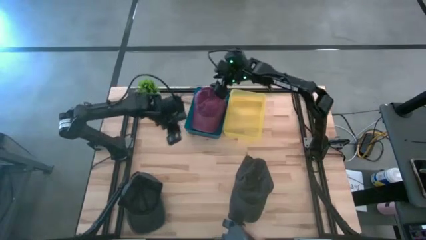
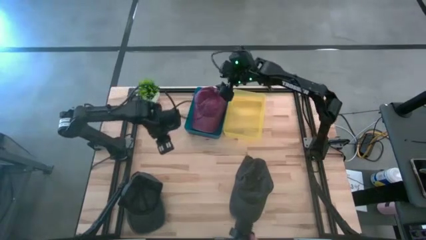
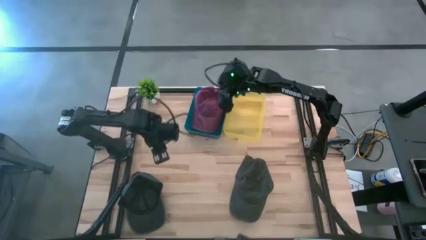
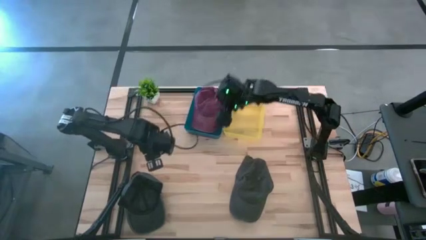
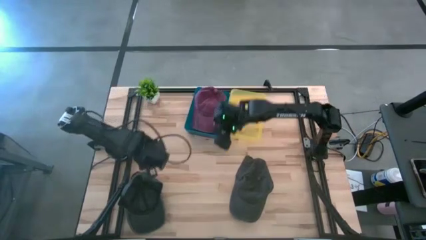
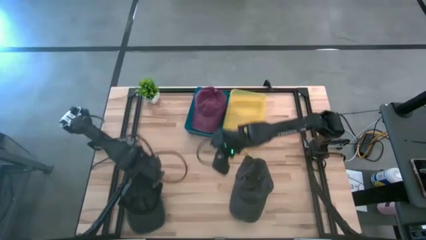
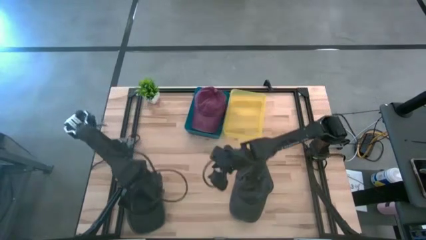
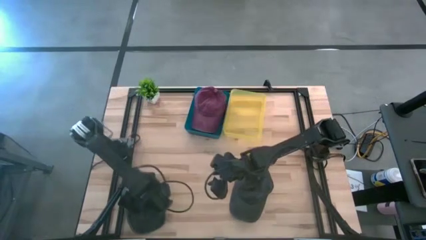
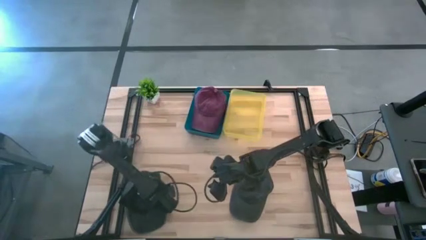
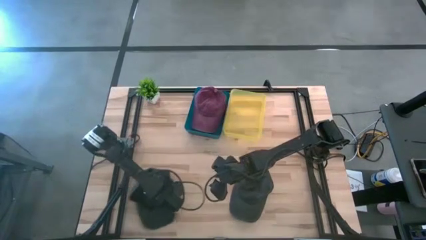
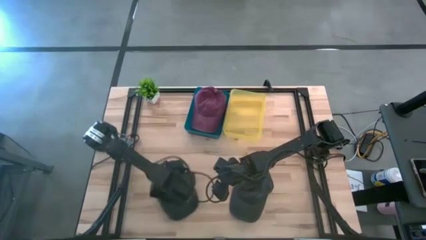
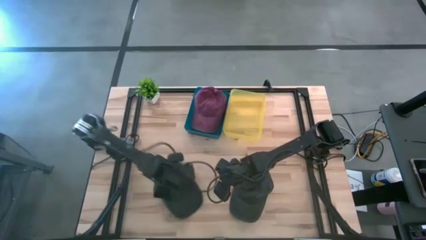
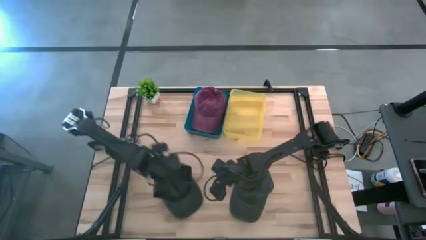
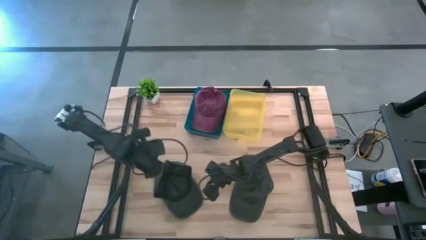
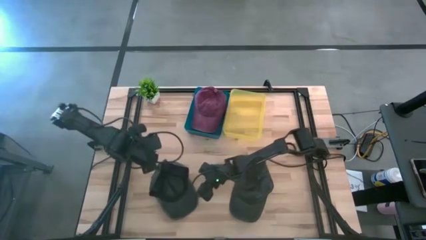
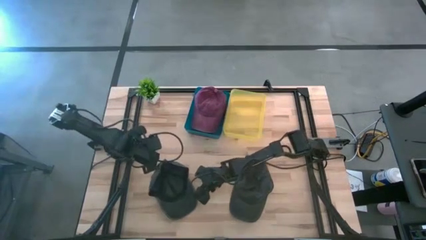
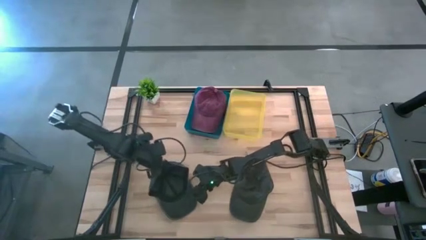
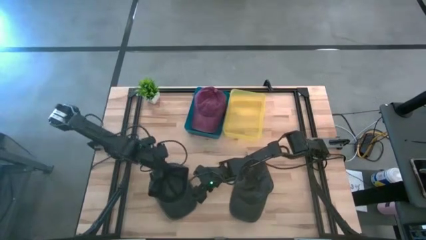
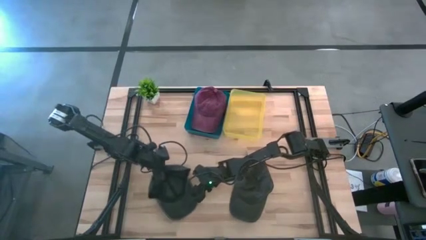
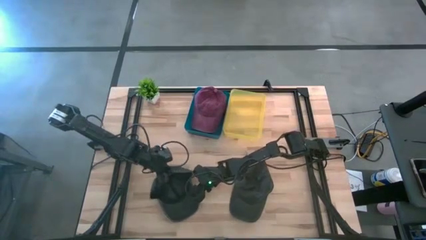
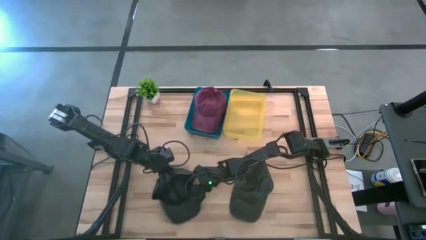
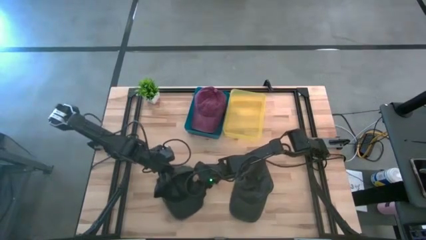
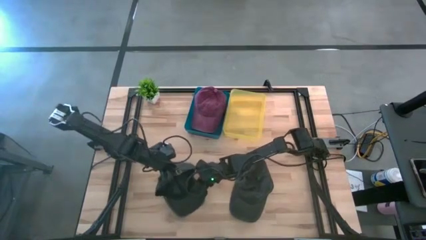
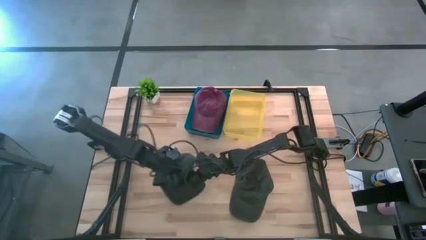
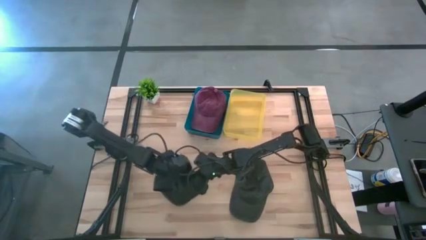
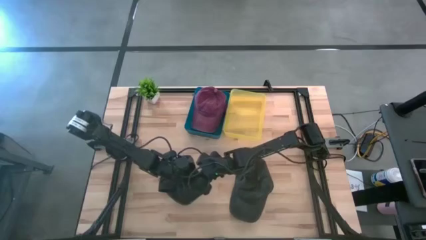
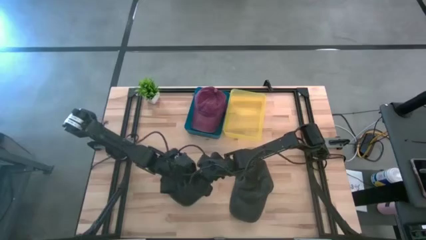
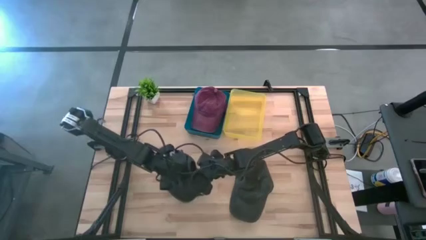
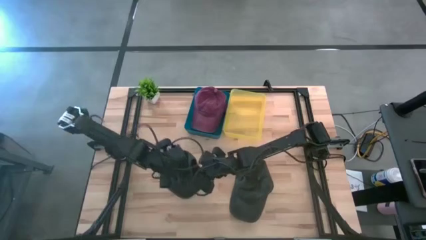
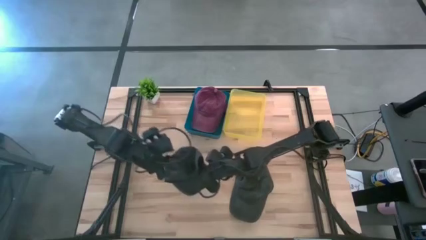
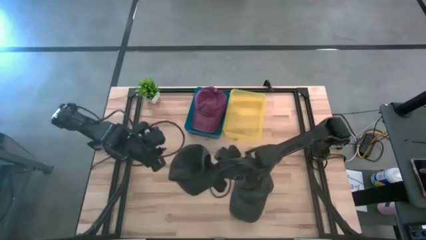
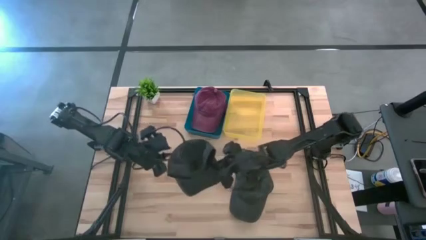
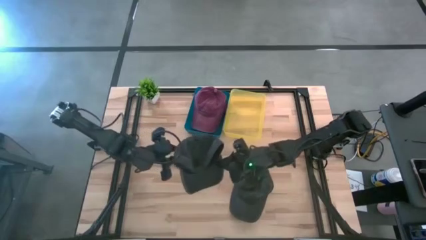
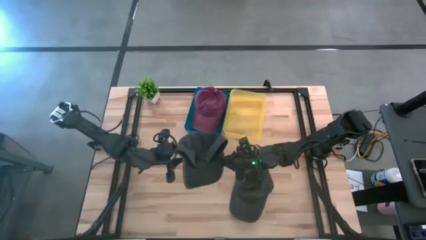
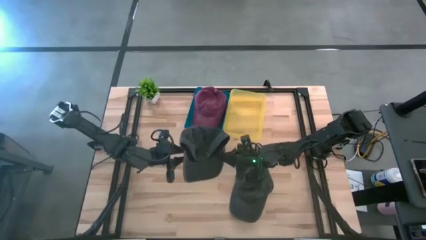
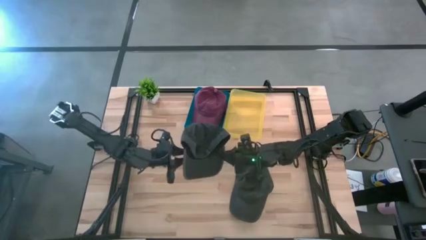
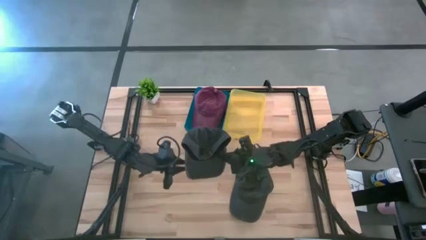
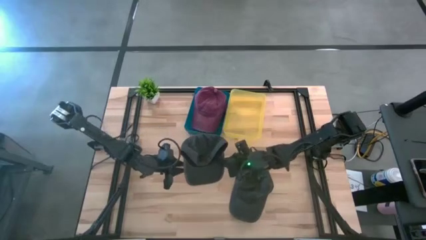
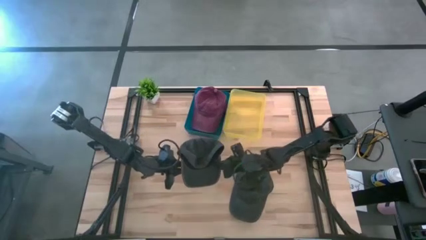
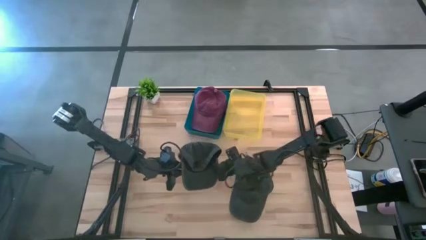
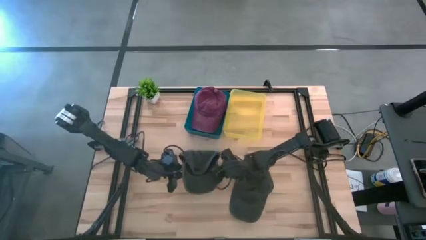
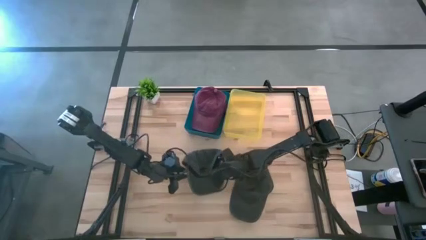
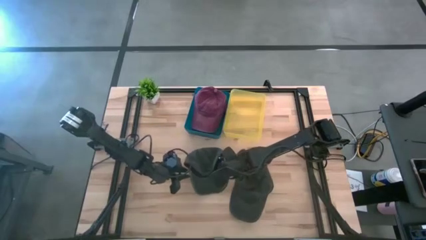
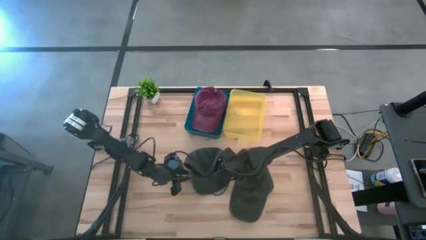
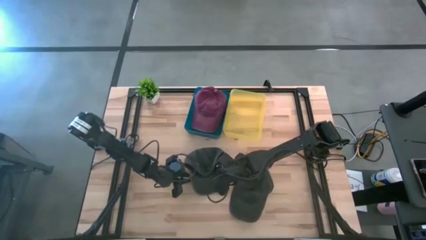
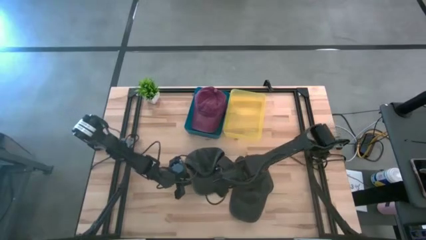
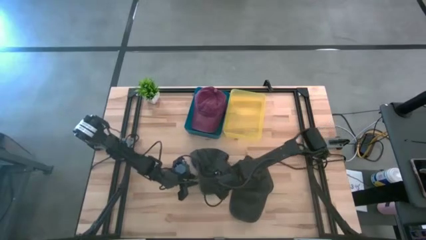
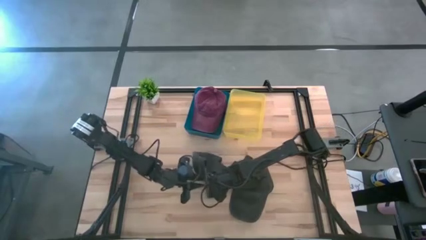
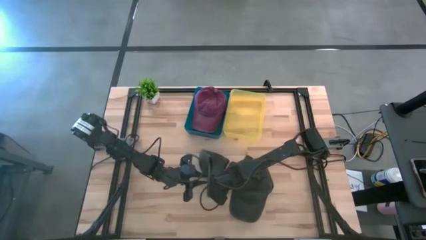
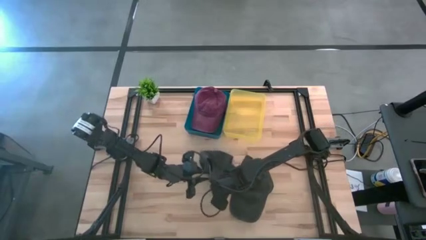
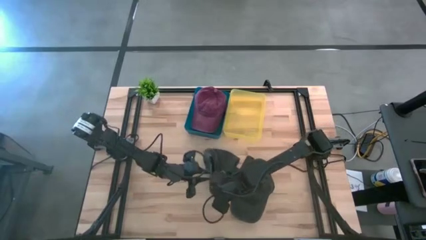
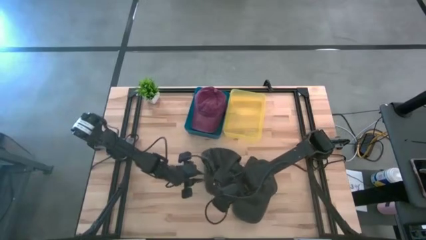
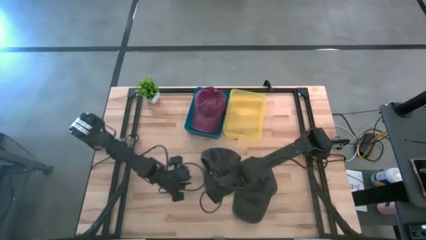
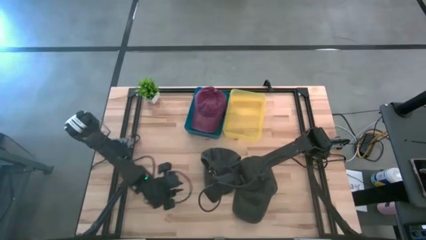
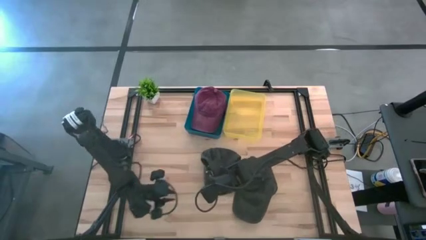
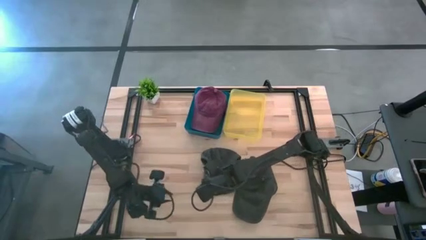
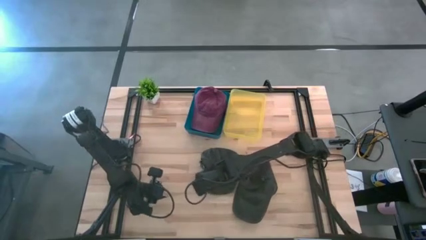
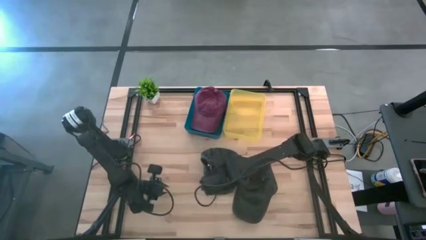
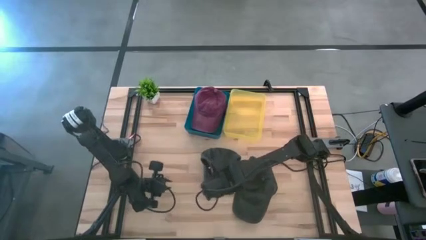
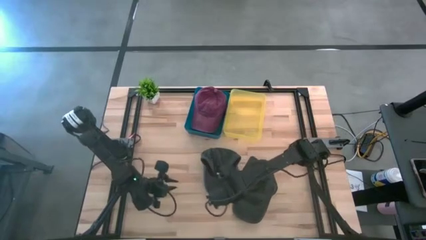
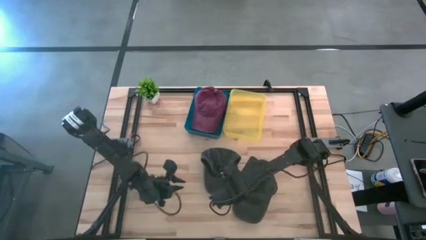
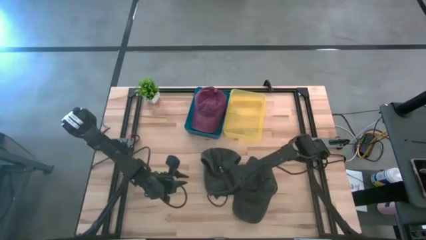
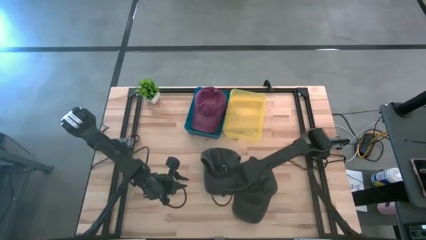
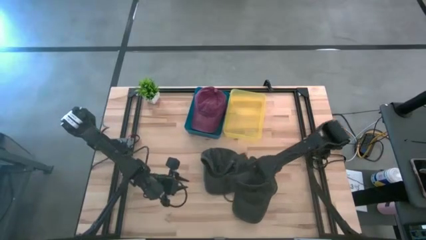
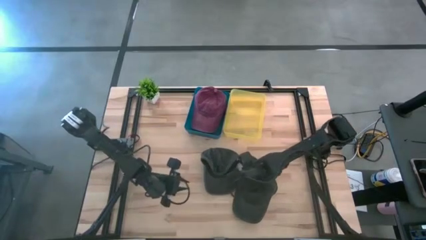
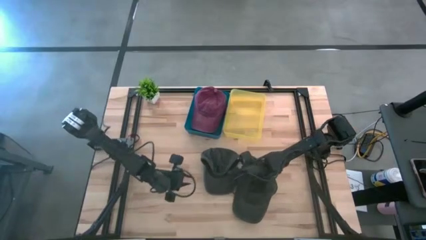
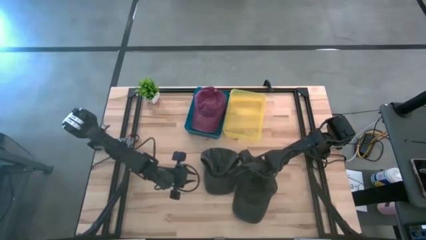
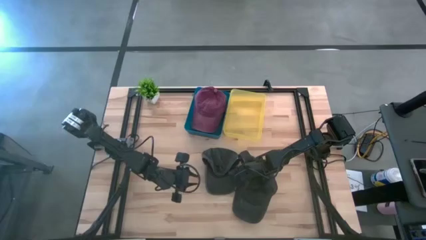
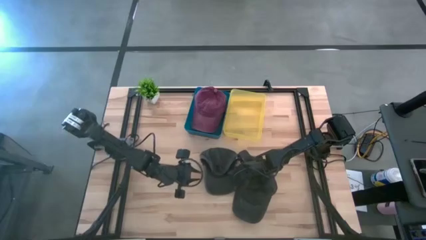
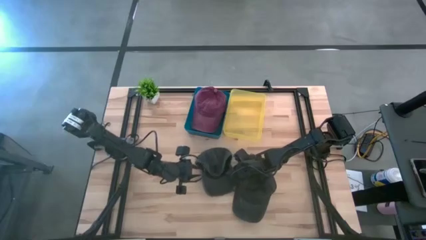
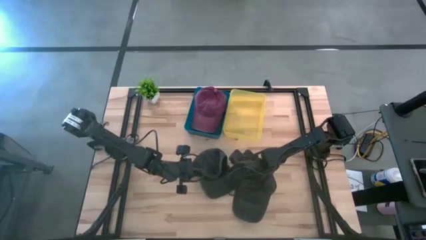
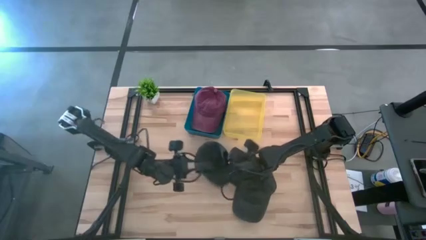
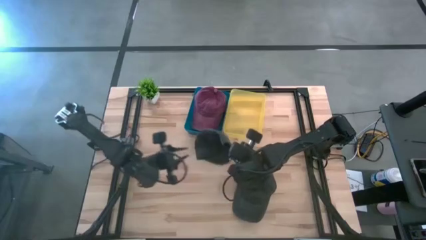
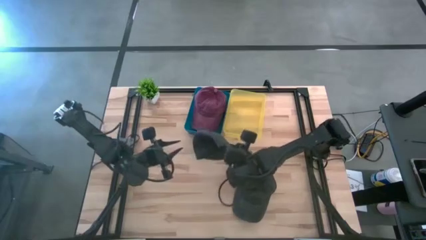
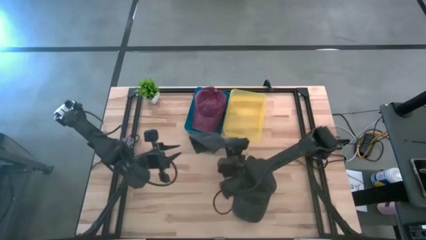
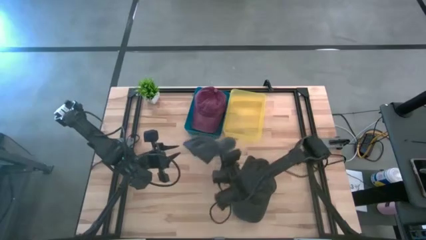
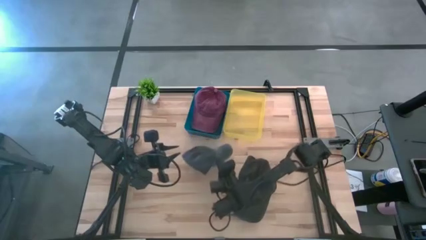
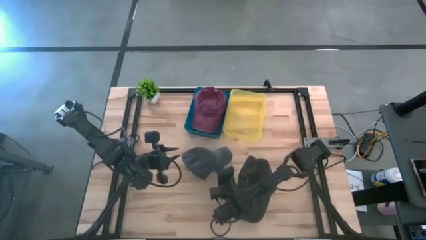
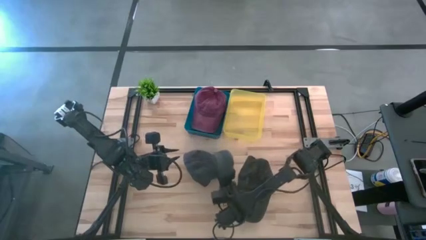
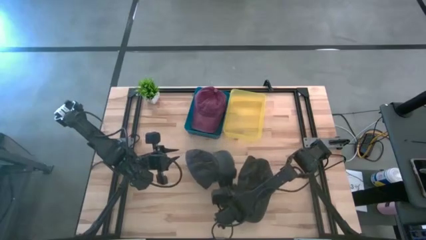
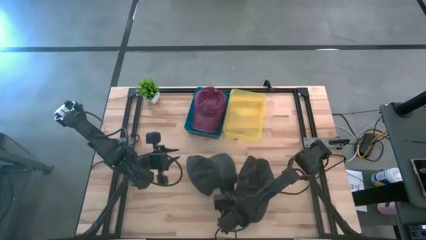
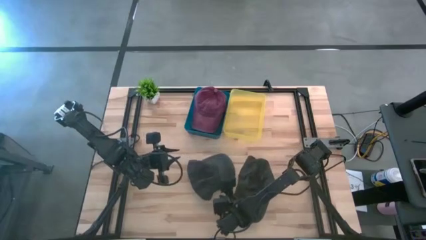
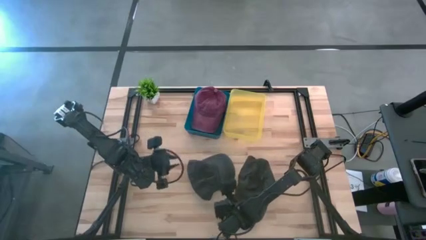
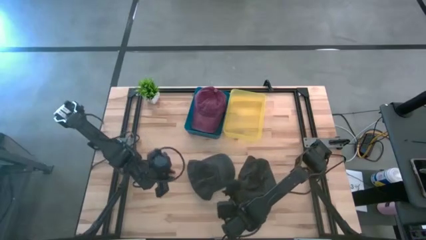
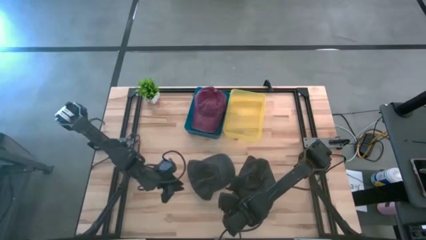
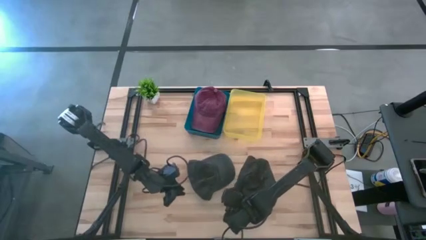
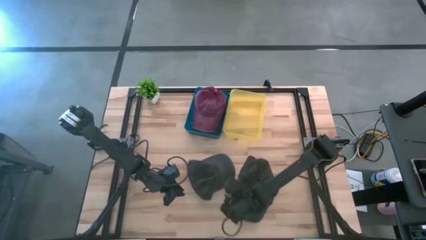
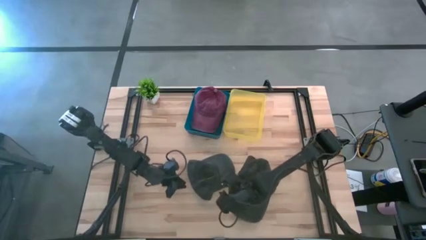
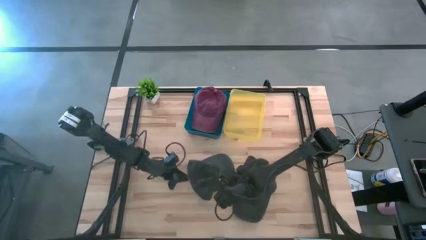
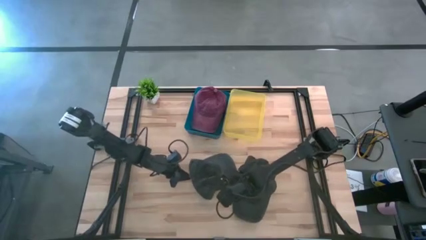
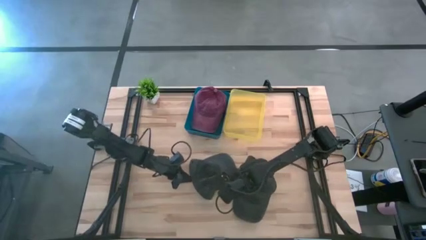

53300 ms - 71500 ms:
Task: Pick & Place hat
Put the left black cap into the yellow bin
